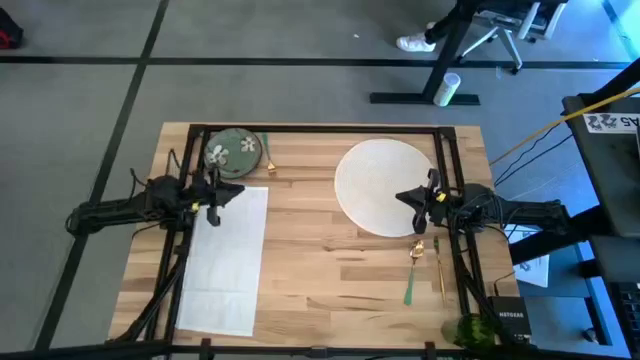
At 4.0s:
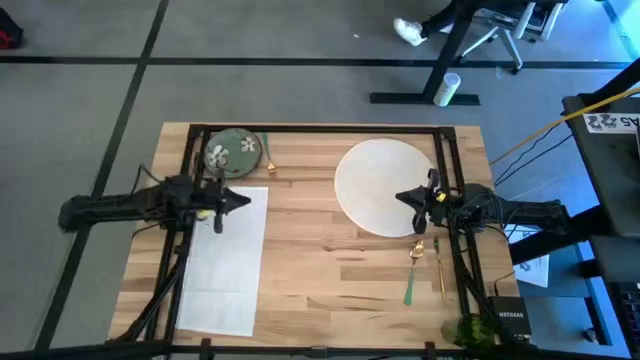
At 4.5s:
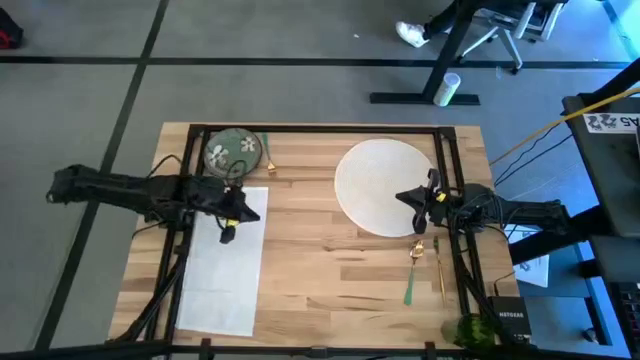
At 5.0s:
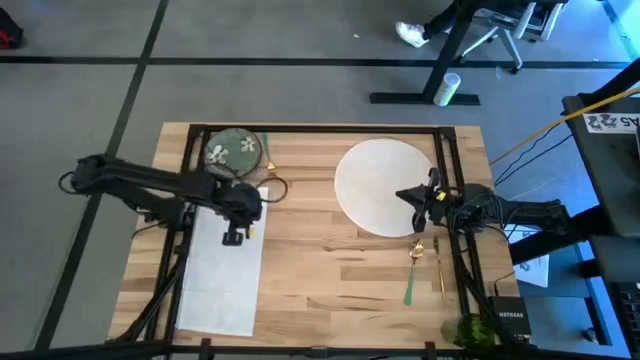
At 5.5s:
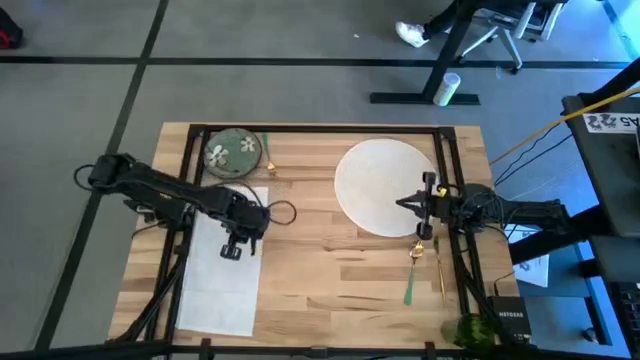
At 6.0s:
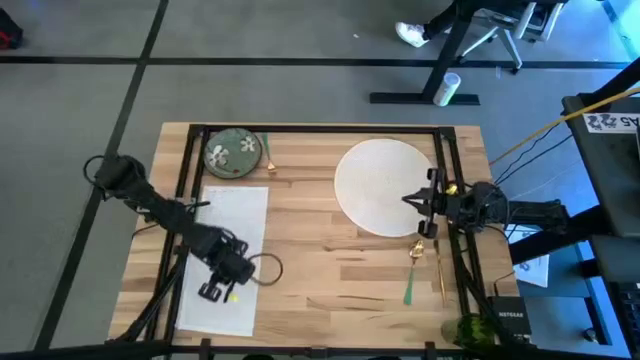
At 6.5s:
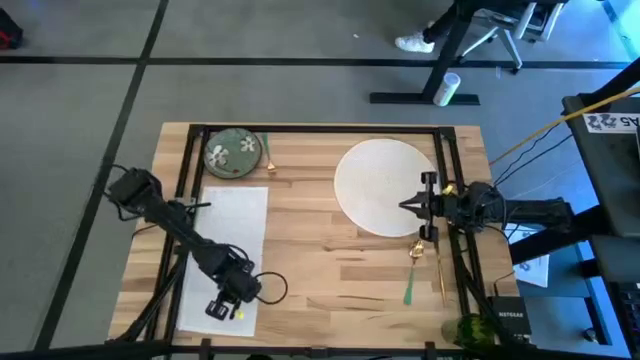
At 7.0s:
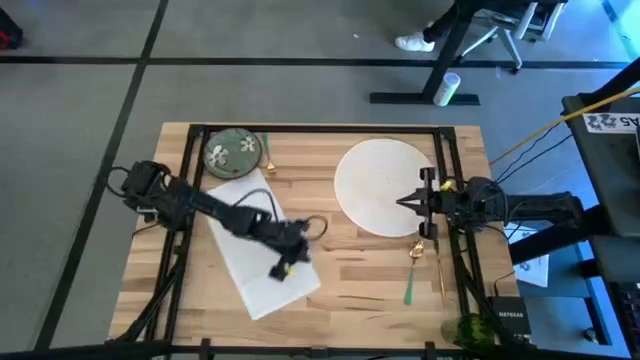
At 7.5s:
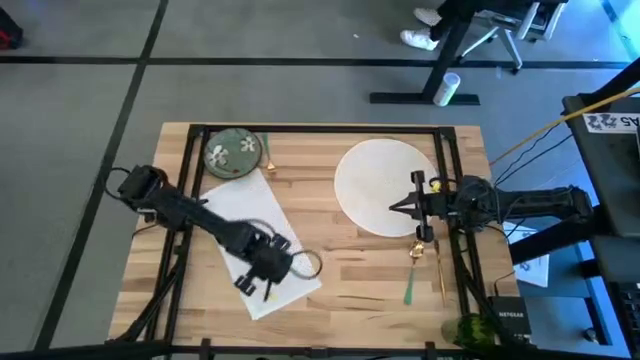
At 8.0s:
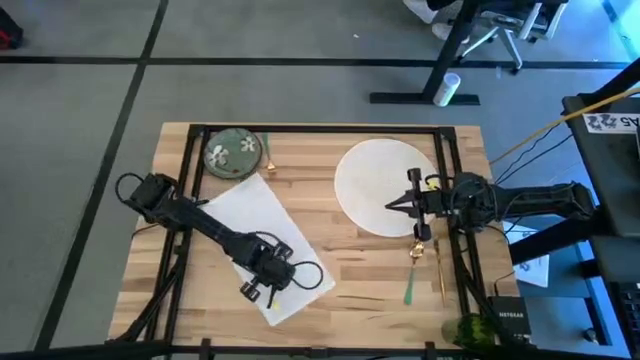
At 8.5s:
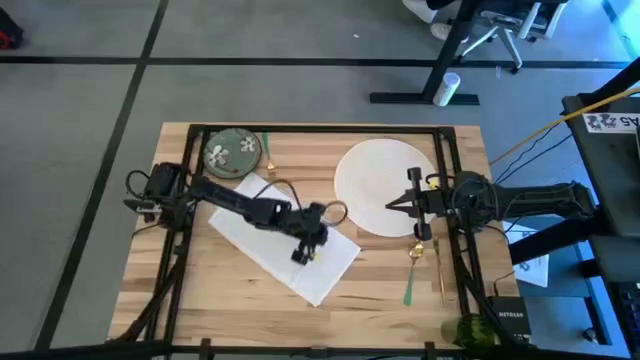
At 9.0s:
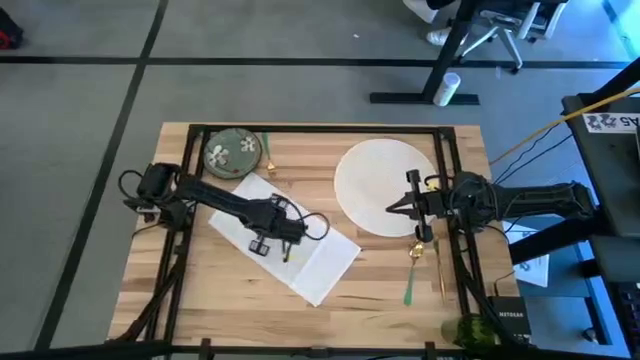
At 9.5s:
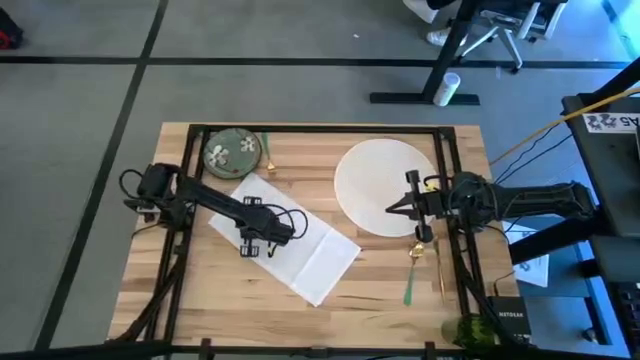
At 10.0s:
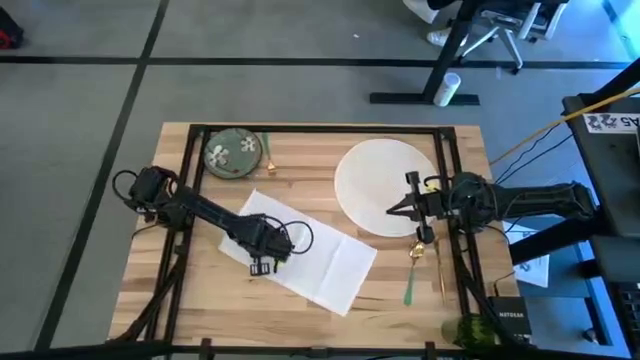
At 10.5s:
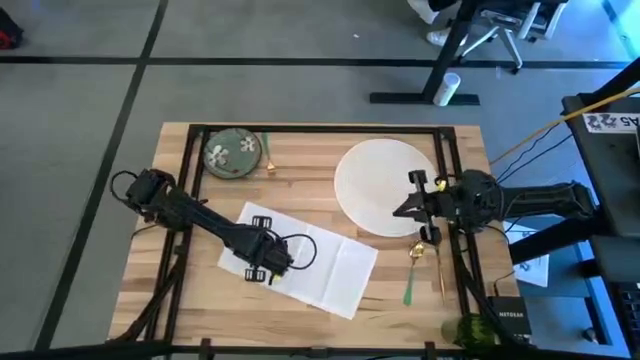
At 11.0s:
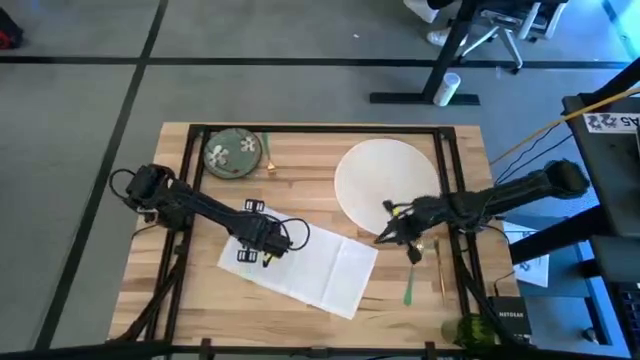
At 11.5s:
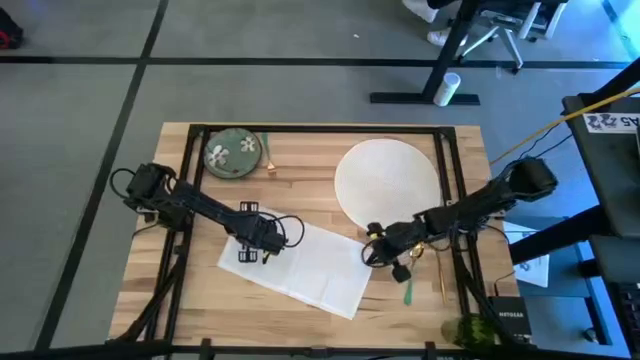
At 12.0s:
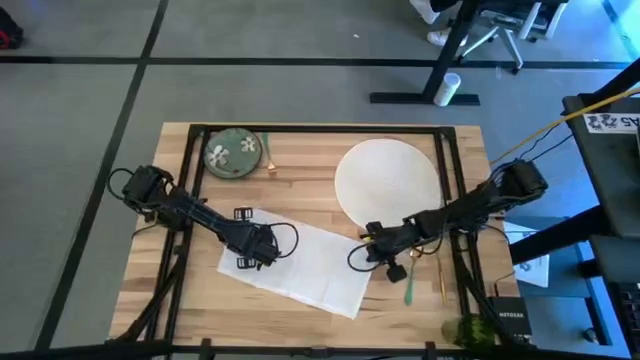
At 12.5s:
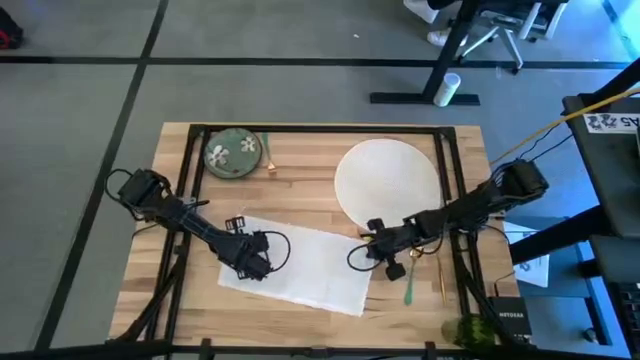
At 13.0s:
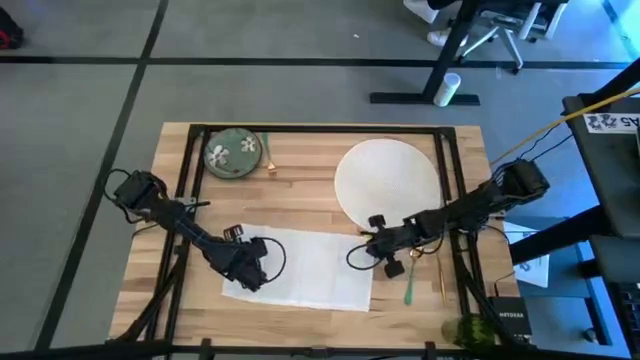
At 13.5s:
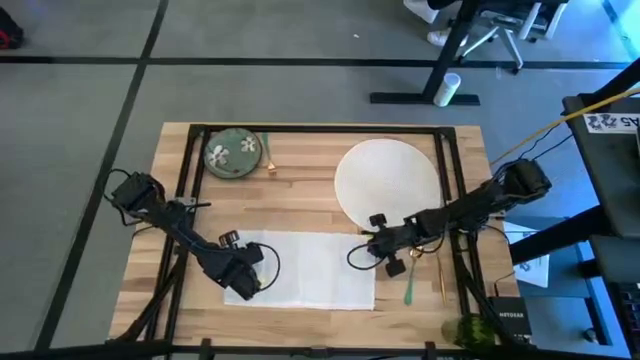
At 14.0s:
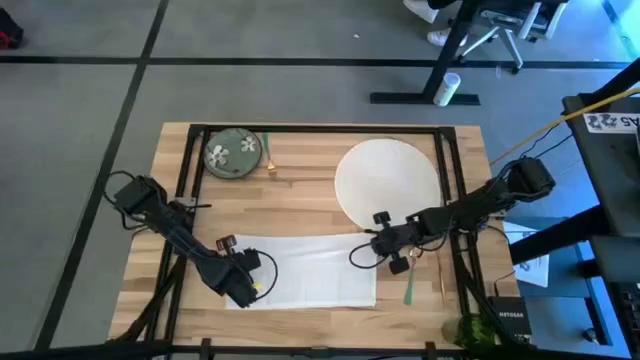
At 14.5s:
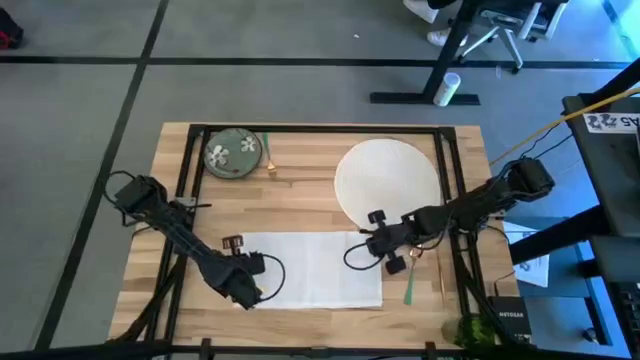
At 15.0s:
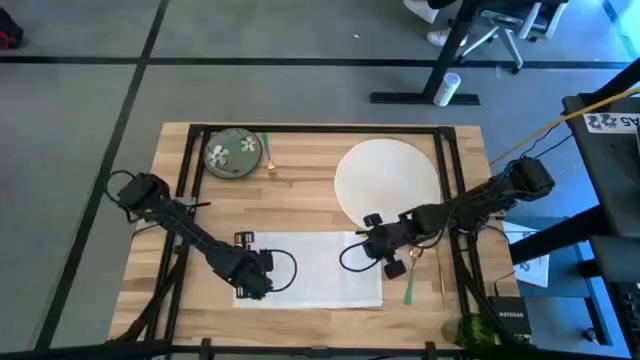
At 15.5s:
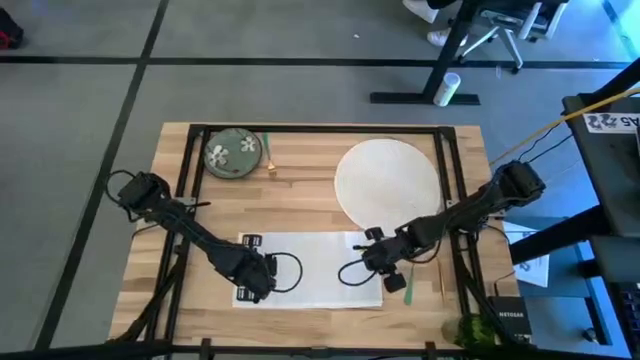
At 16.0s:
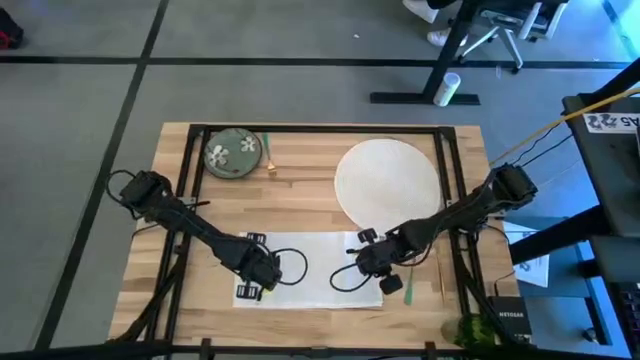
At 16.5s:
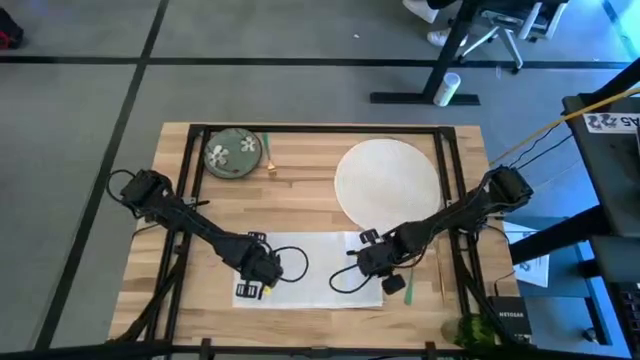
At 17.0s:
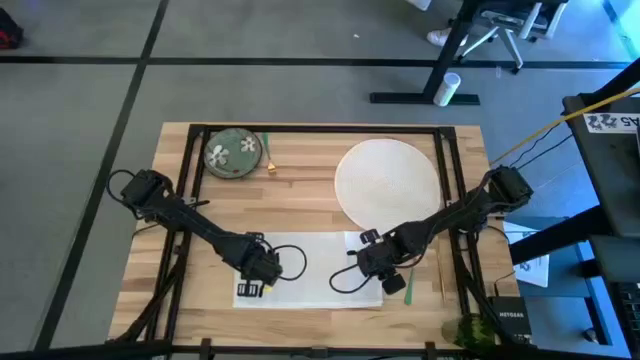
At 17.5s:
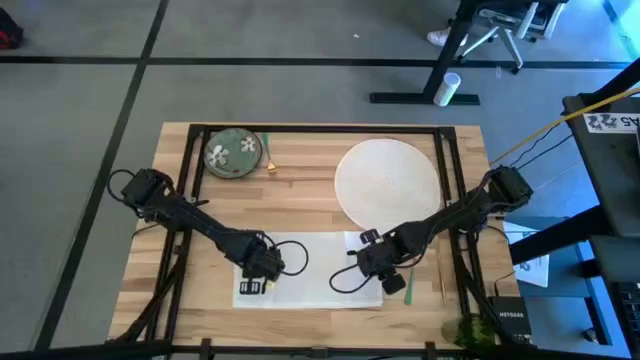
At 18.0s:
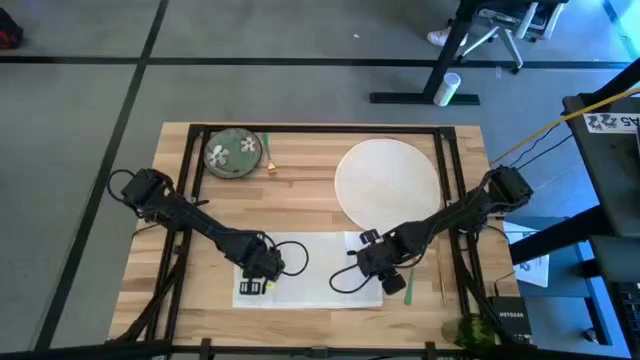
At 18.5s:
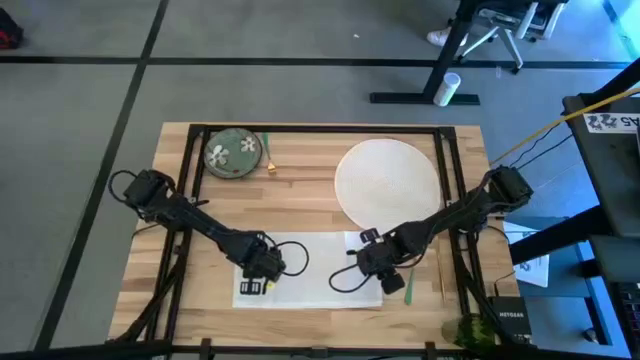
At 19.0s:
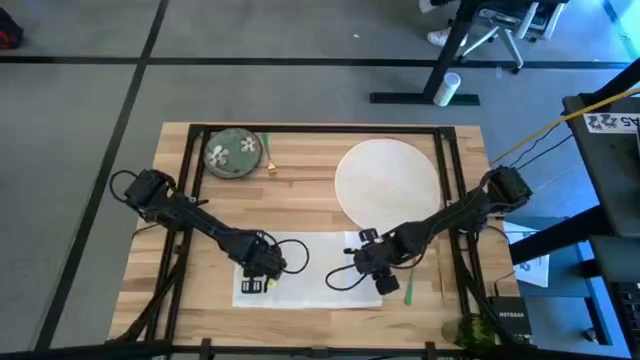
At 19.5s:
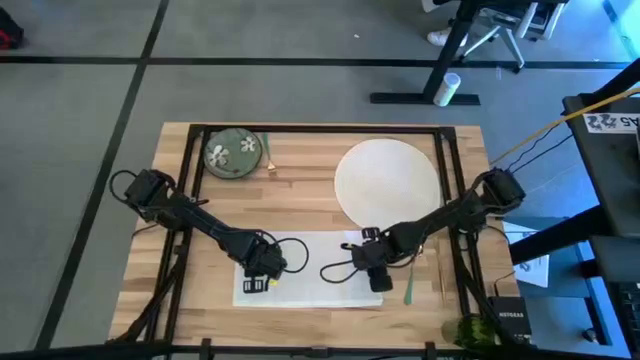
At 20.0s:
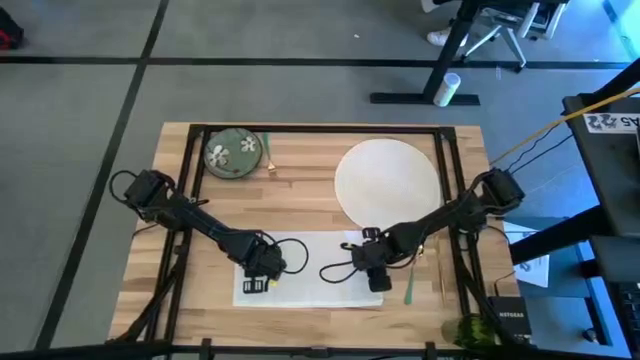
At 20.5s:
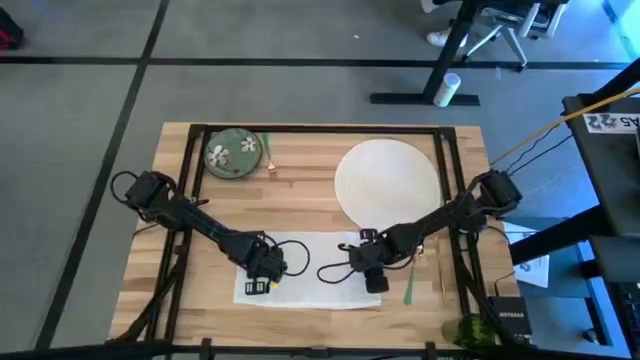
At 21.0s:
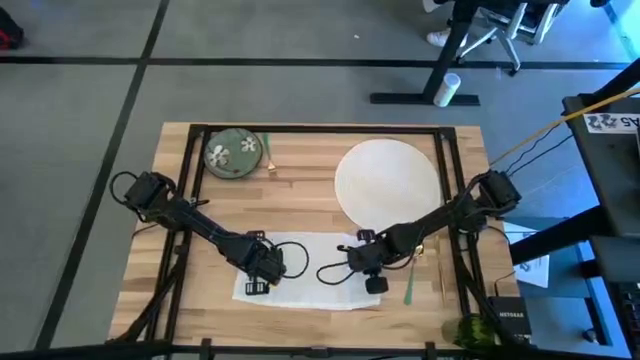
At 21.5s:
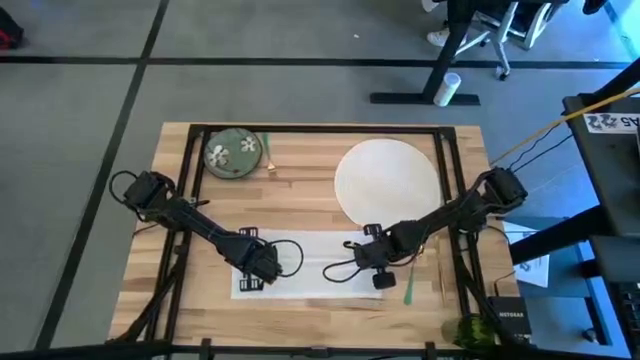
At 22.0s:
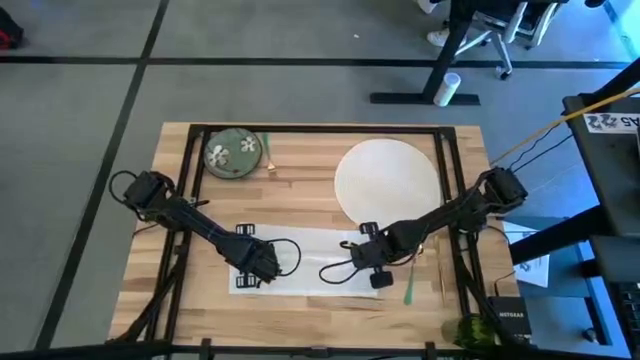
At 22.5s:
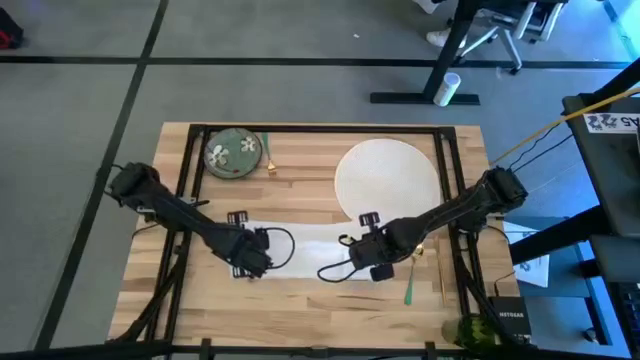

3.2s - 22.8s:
Task: Set table place
Fold the white table napkin

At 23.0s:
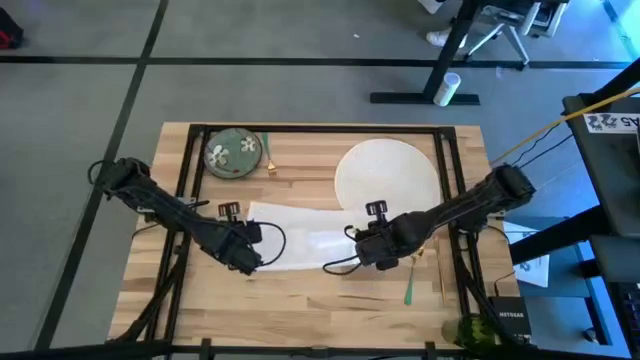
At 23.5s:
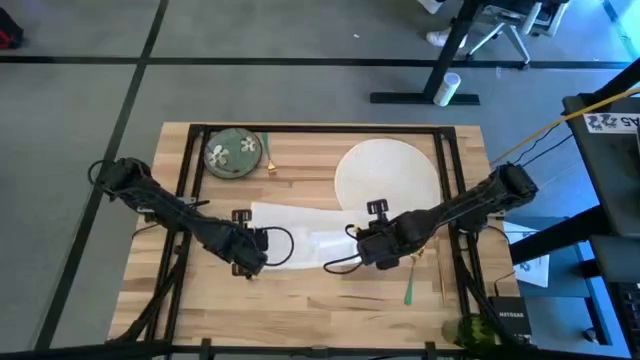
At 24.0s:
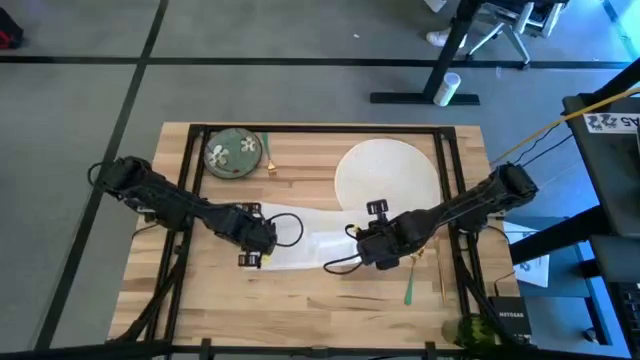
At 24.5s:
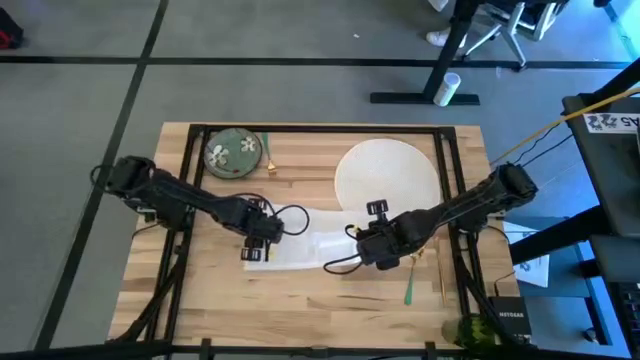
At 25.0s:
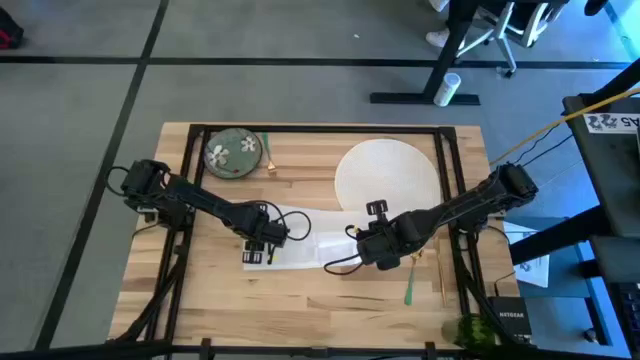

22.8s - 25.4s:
Fold the white table napkin
